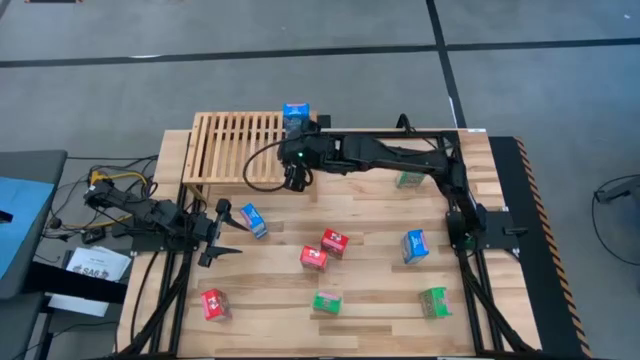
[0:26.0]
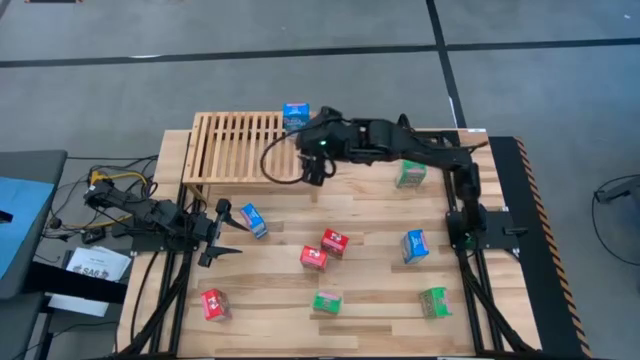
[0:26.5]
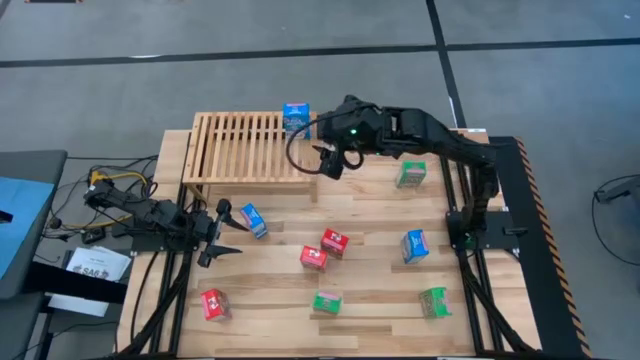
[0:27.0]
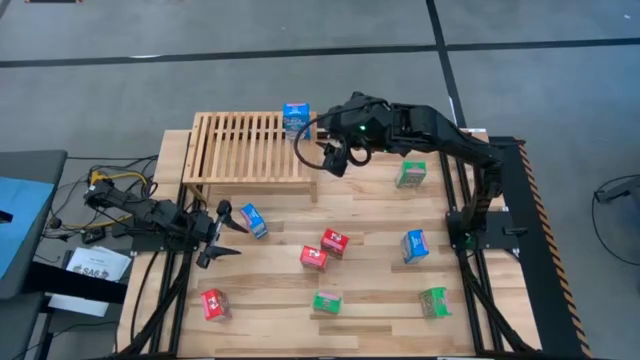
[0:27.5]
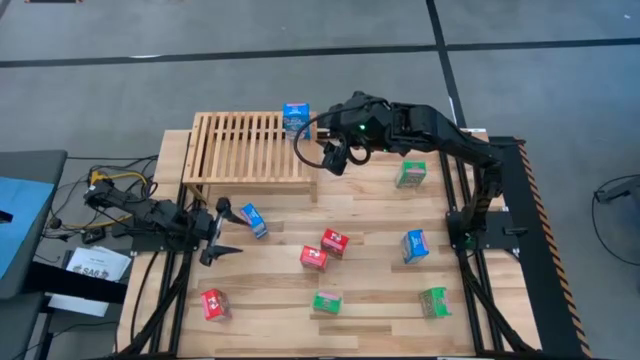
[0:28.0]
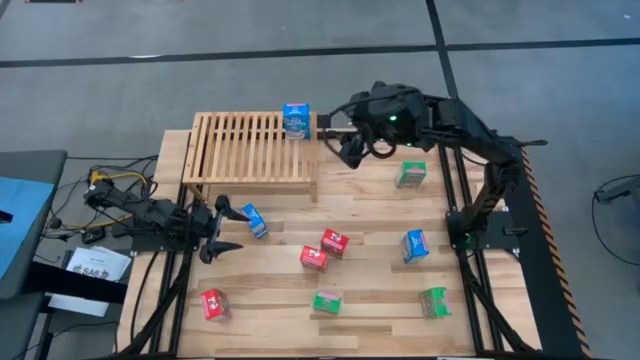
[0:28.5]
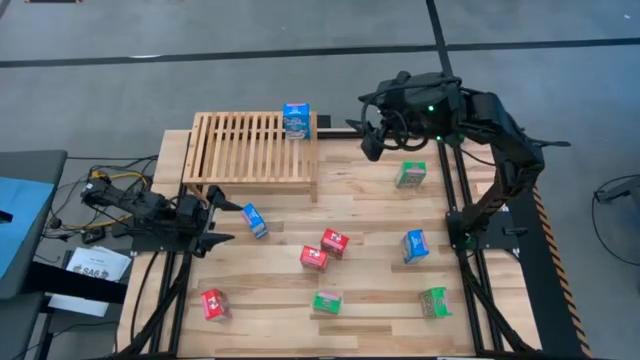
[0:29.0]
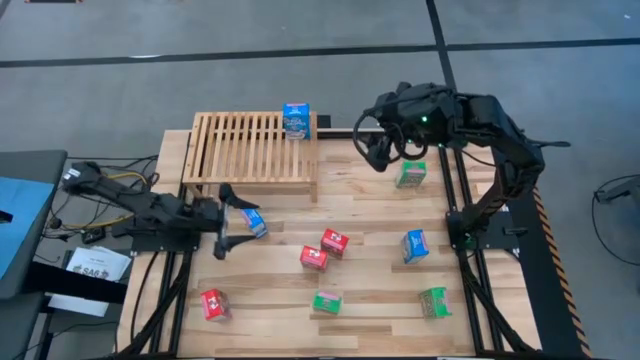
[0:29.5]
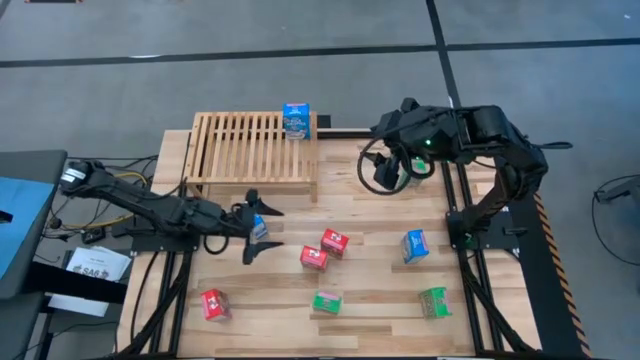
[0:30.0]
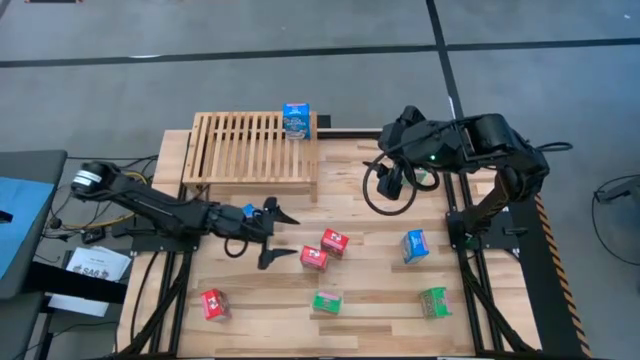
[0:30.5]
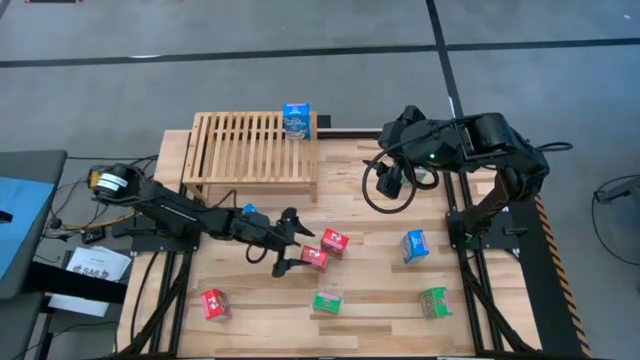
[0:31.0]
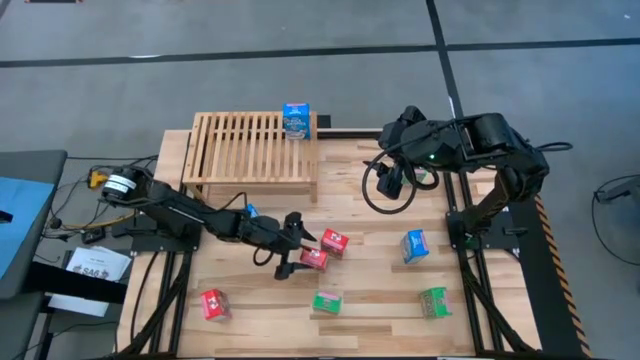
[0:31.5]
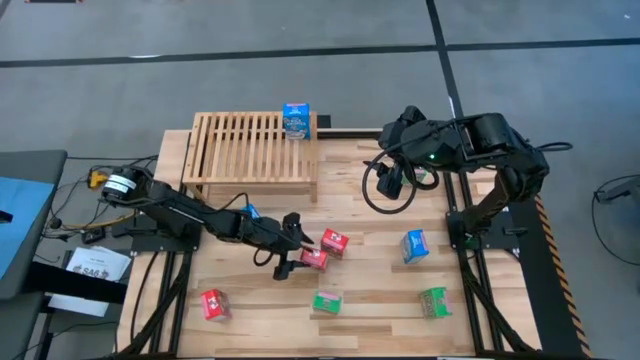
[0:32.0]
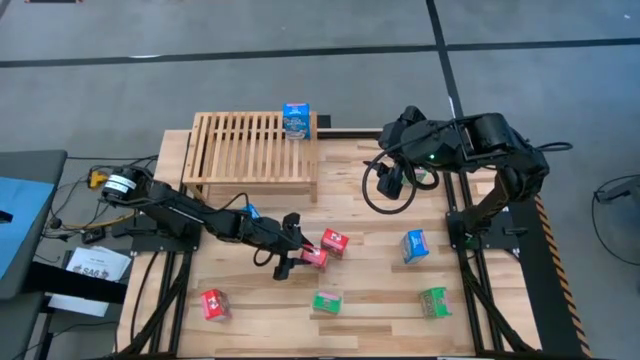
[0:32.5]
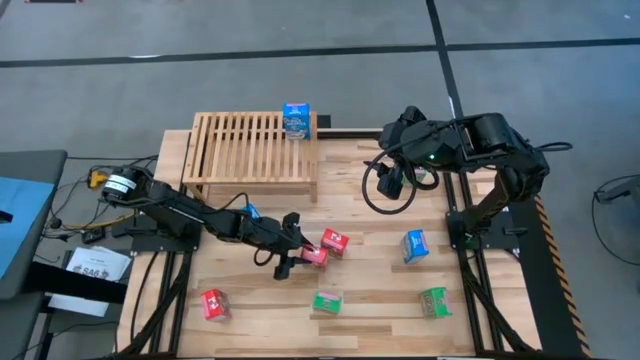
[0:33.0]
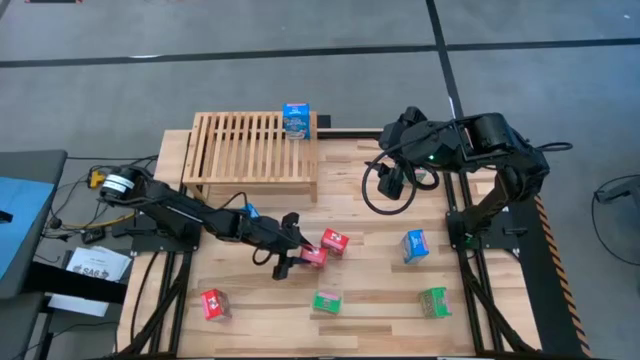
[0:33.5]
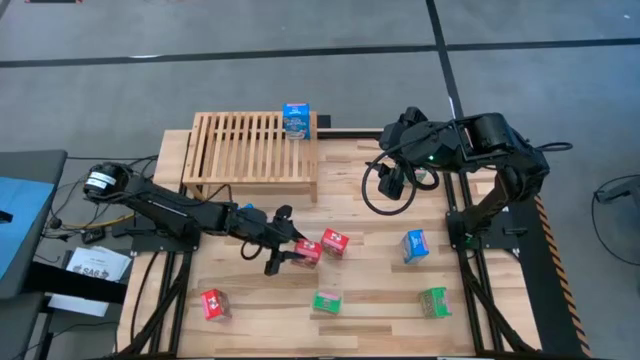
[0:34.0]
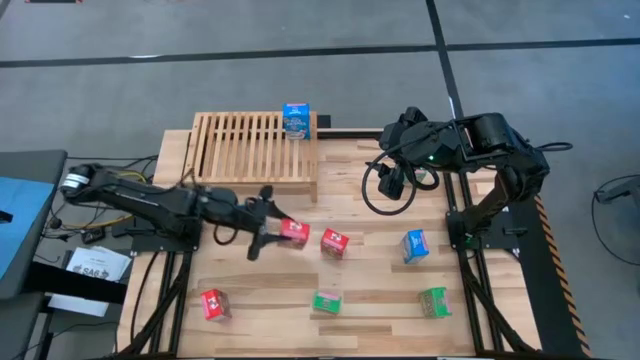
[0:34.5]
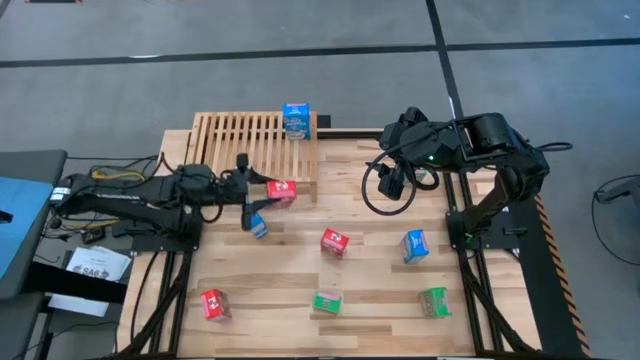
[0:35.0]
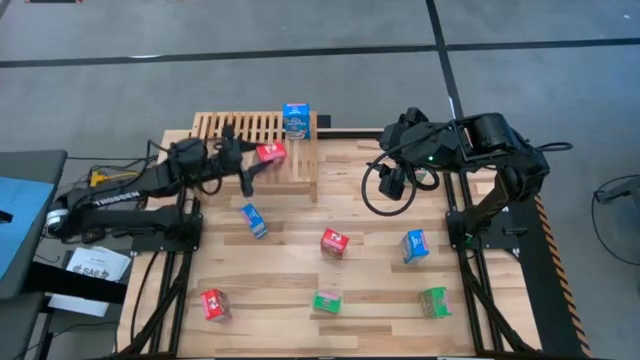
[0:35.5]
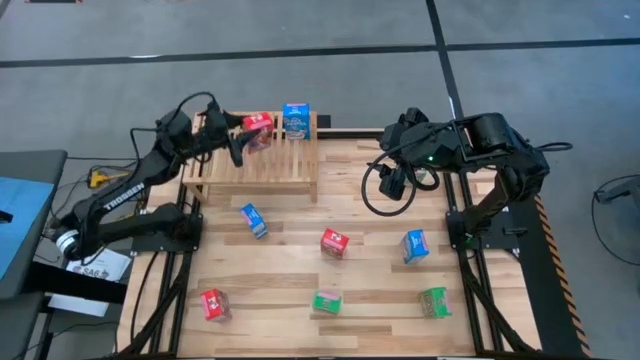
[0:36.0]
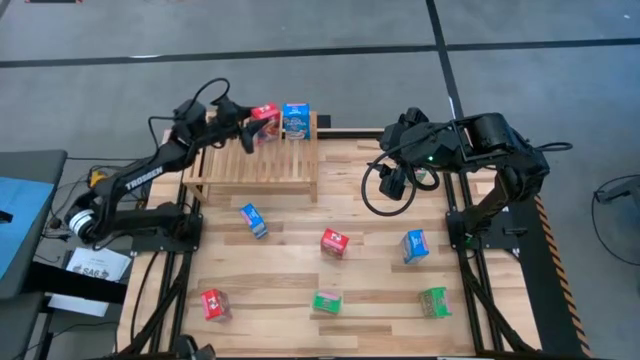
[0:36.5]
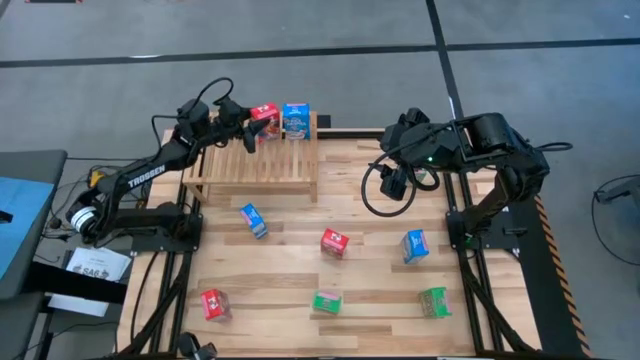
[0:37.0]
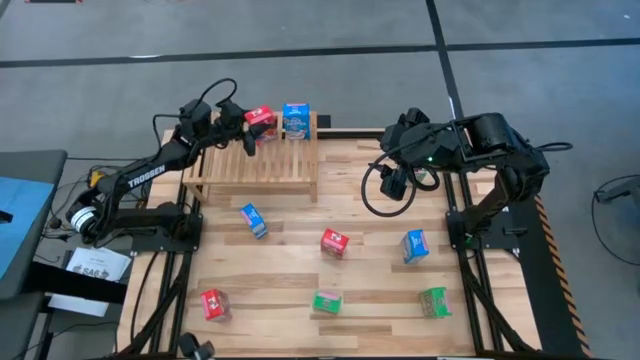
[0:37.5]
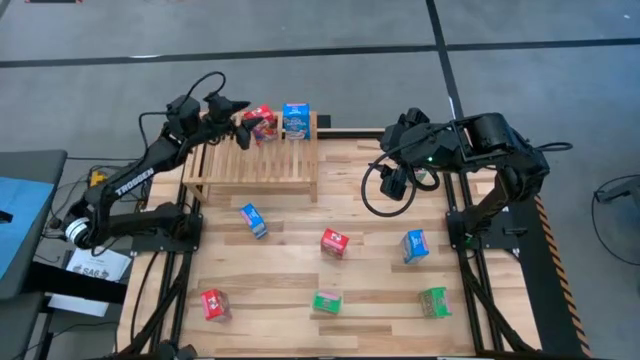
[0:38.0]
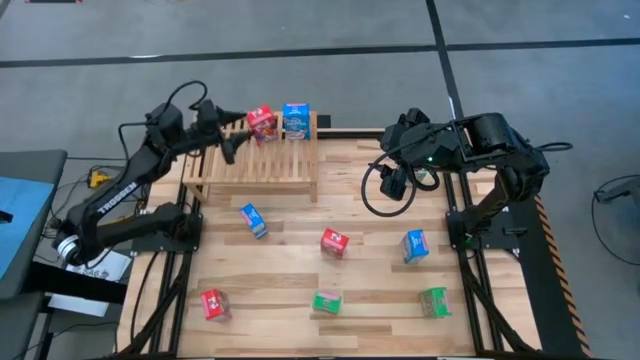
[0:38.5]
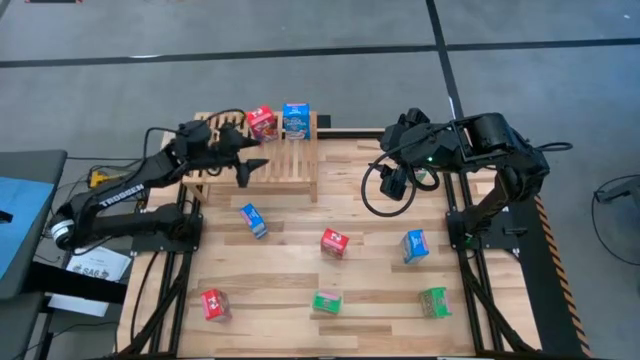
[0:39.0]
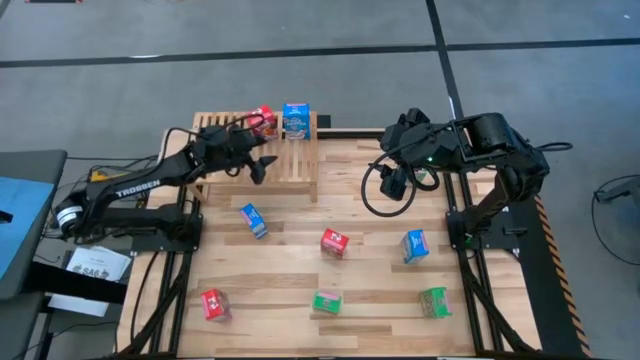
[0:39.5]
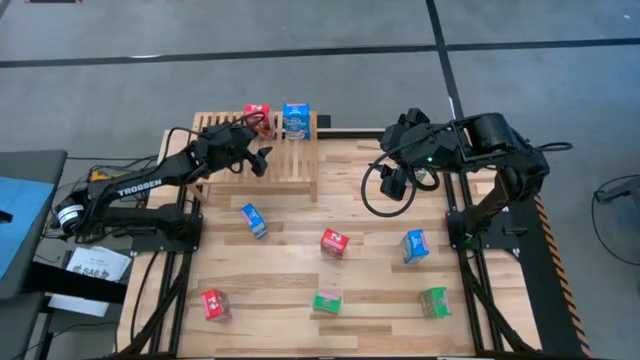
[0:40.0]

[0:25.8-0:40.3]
Task: Stack cereal on shelf
Put the middle red cereal box on the shelf

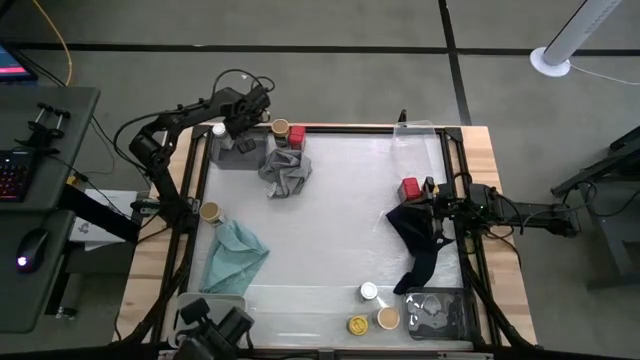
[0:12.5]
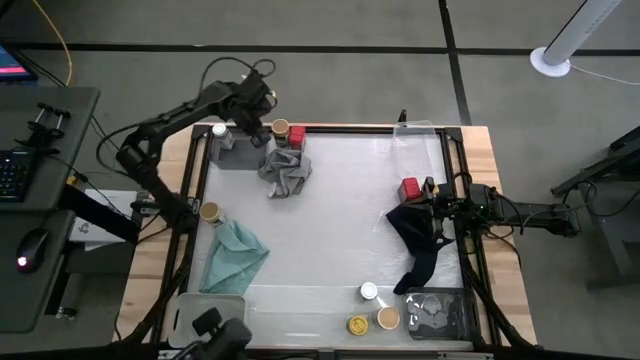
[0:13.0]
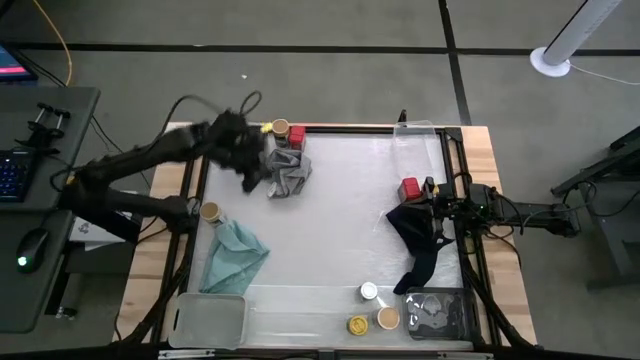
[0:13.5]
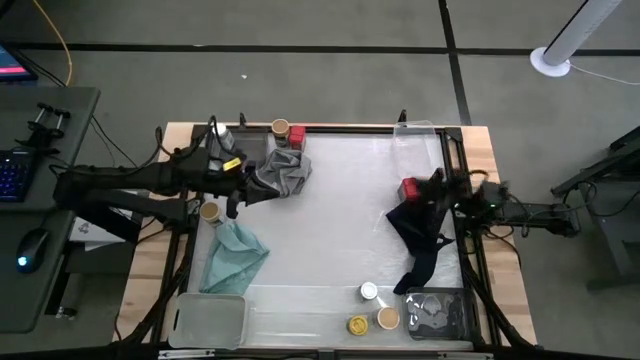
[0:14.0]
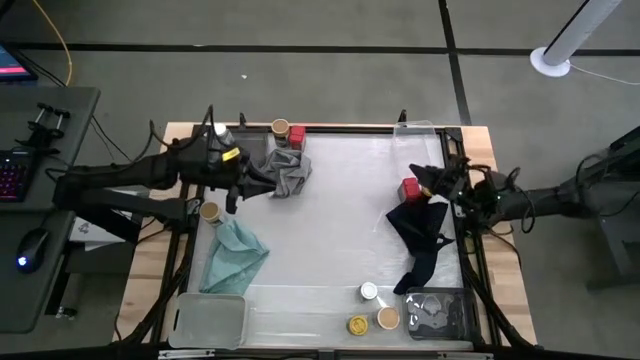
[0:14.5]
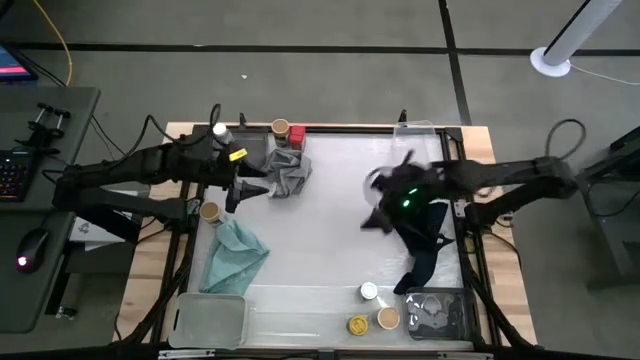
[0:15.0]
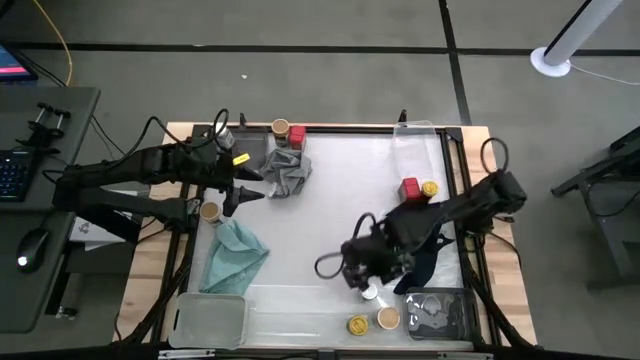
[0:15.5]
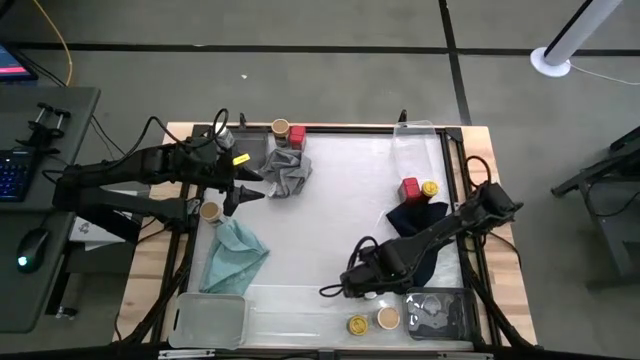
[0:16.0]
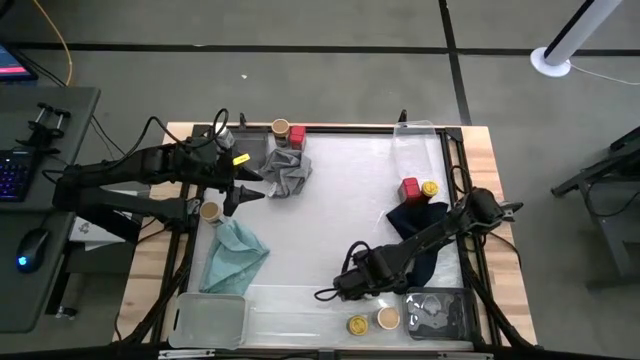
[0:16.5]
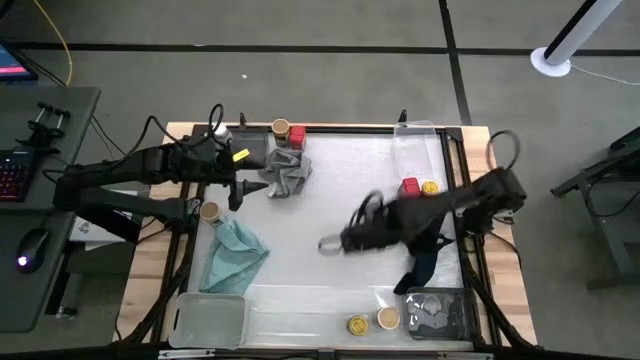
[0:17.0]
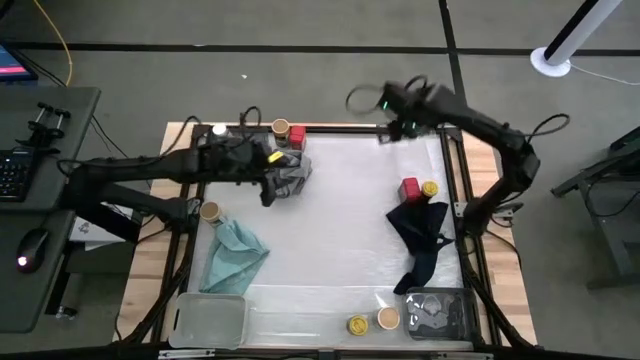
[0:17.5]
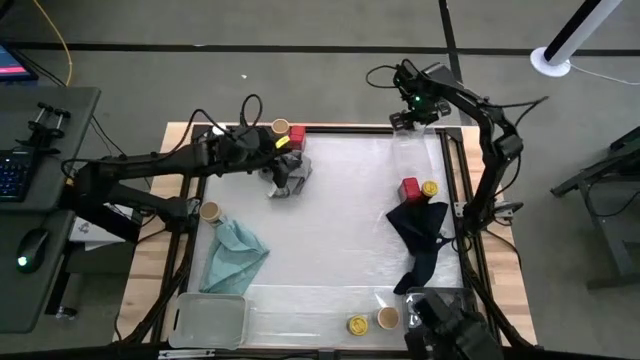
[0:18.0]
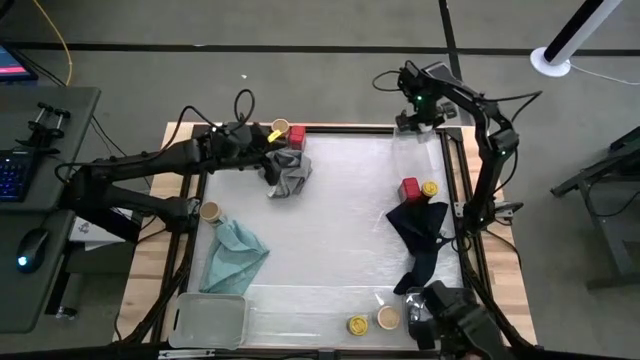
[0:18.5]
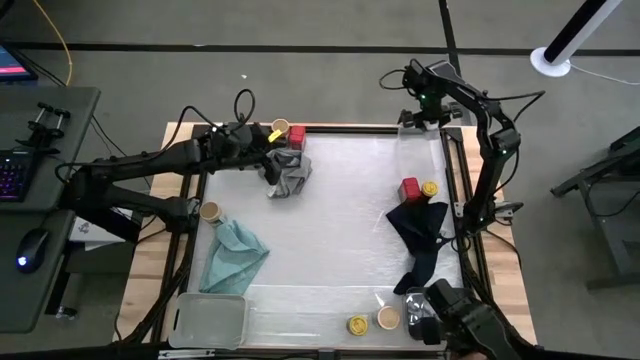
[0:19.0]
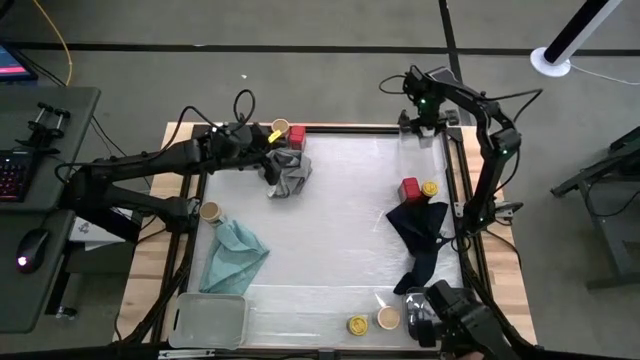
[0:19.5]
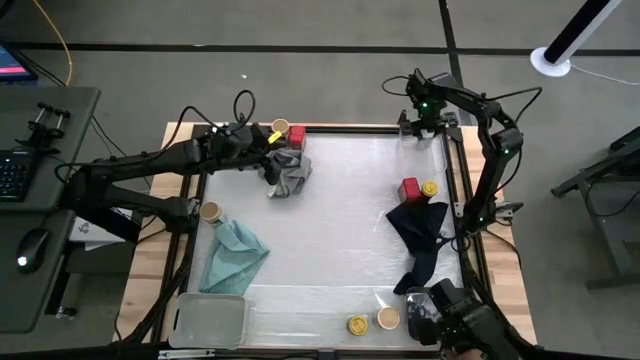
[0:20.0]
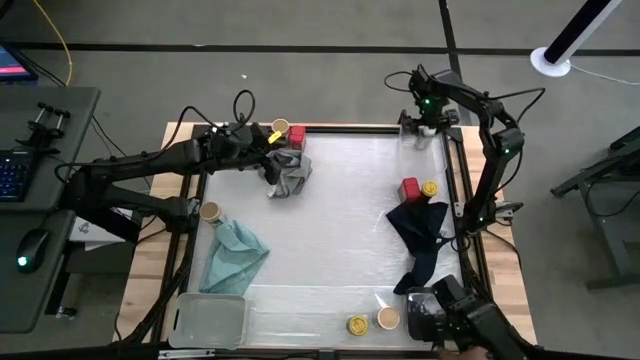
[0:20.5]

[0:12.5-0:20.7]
Task: Sort spices by type
Put the white seasoning bottle into the top black bin
